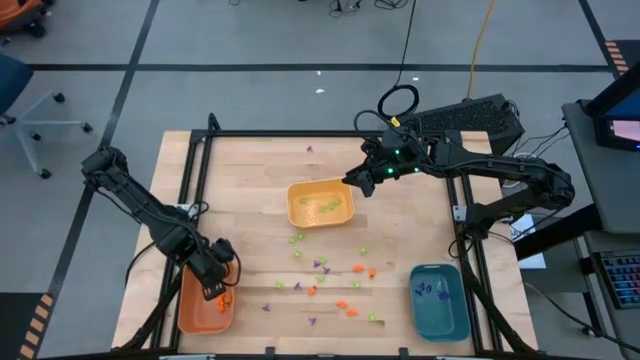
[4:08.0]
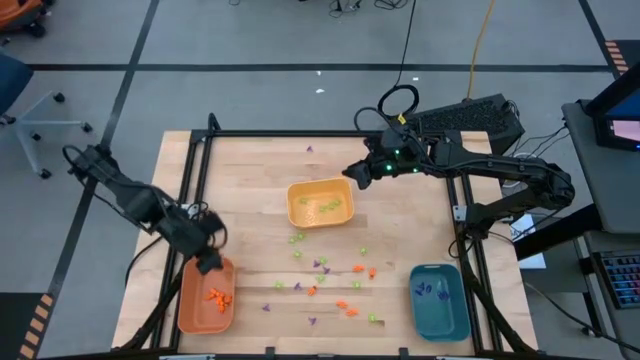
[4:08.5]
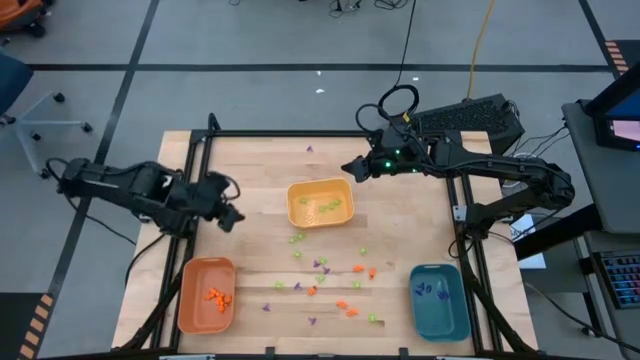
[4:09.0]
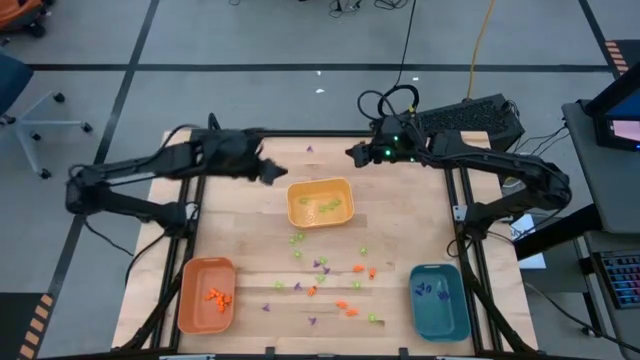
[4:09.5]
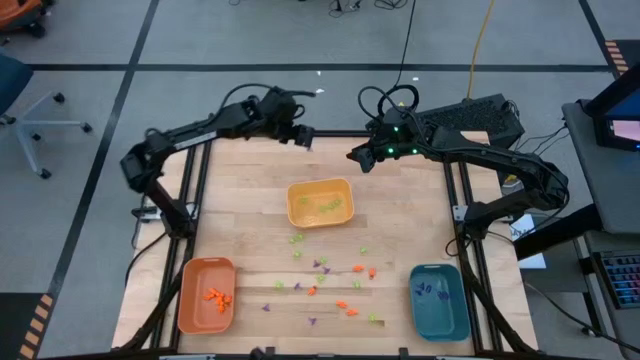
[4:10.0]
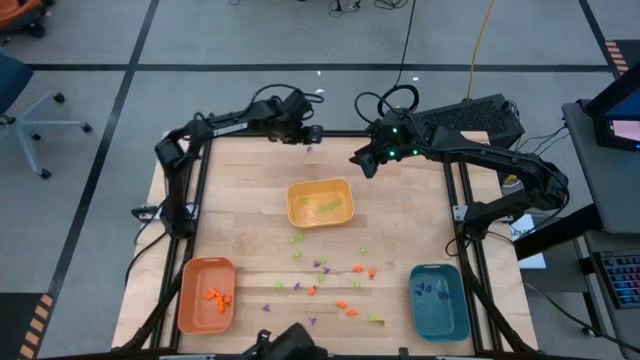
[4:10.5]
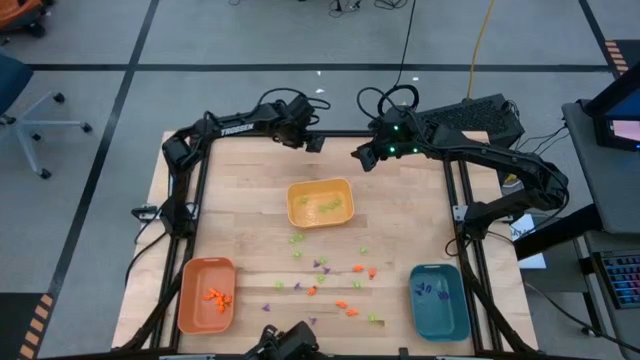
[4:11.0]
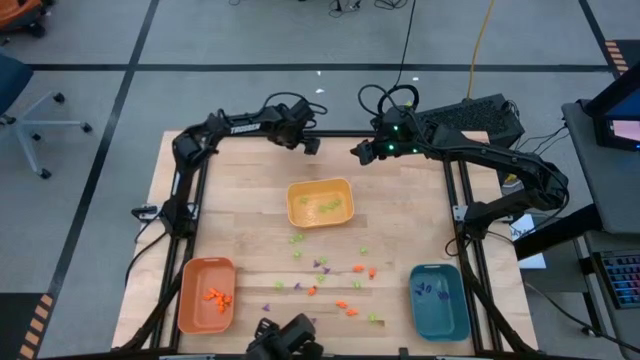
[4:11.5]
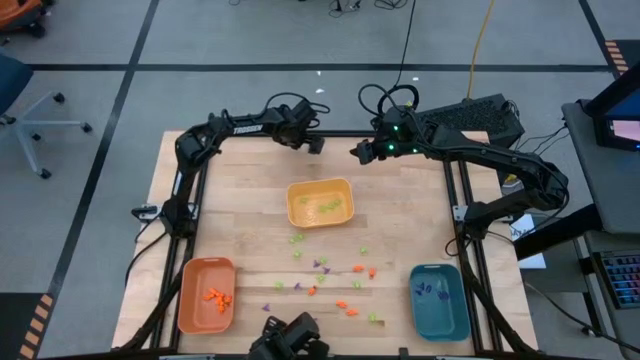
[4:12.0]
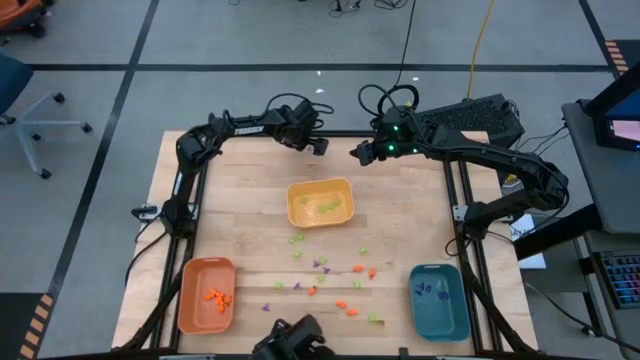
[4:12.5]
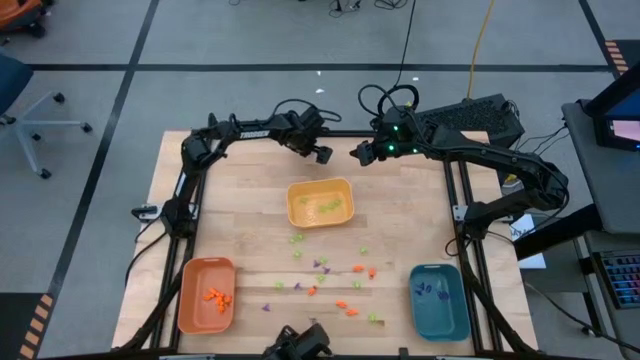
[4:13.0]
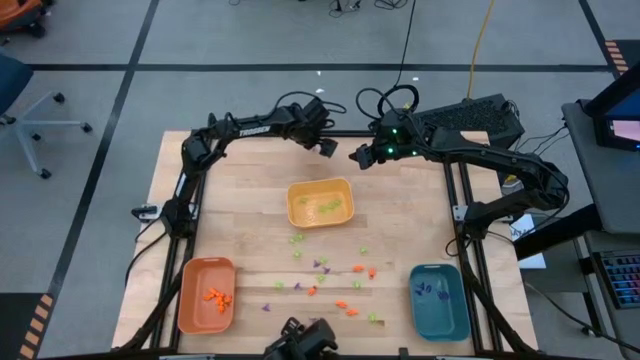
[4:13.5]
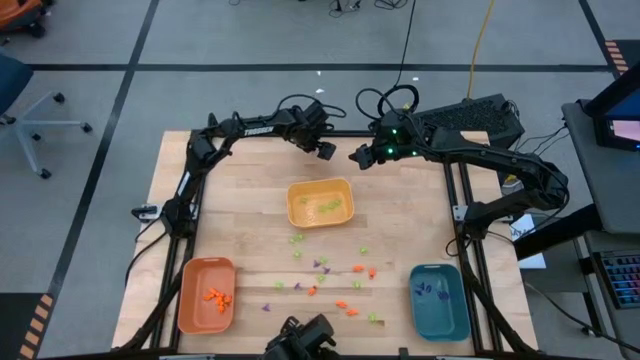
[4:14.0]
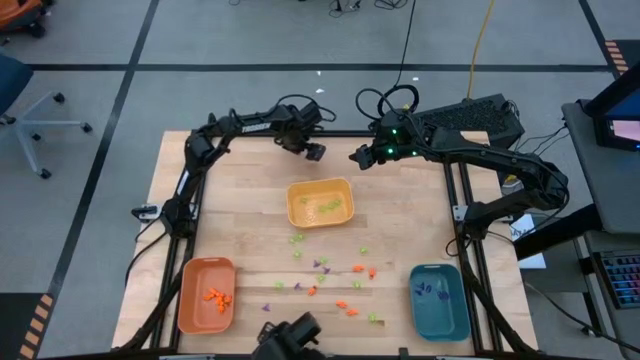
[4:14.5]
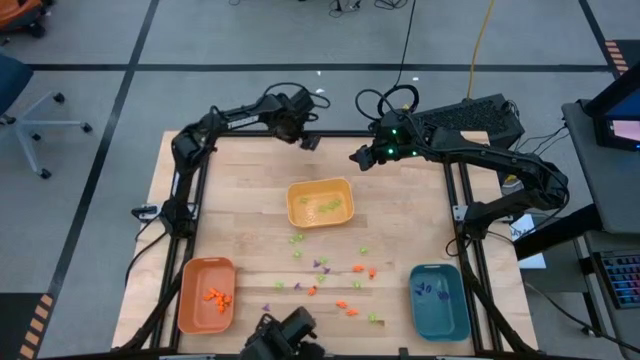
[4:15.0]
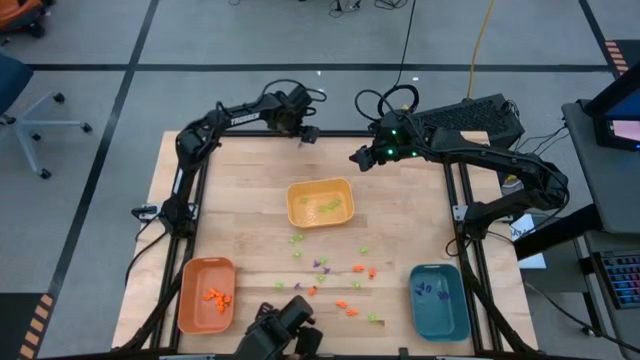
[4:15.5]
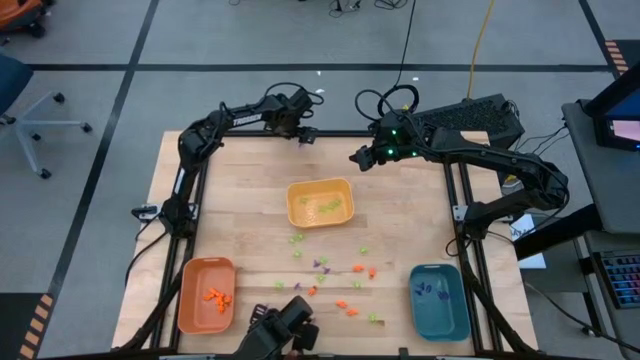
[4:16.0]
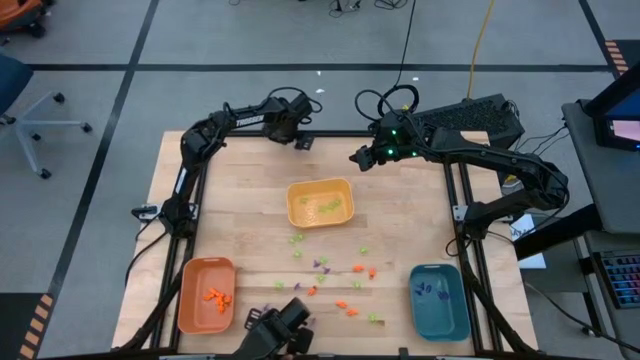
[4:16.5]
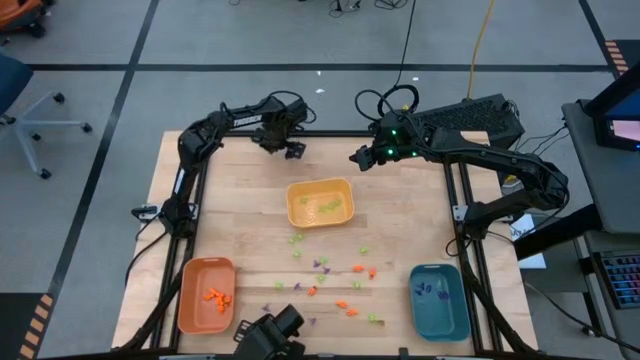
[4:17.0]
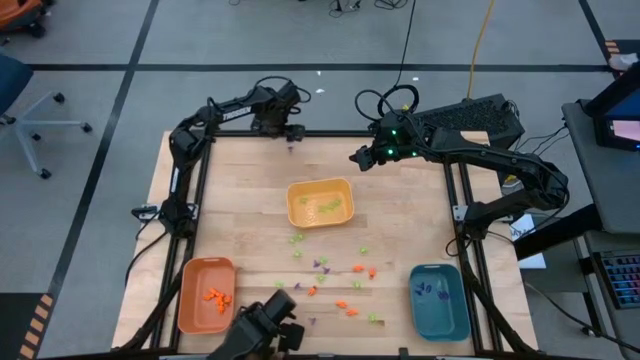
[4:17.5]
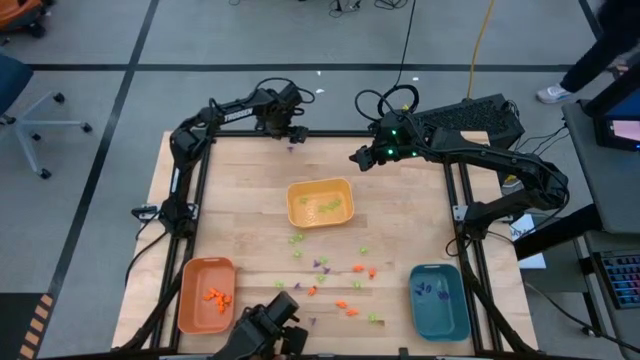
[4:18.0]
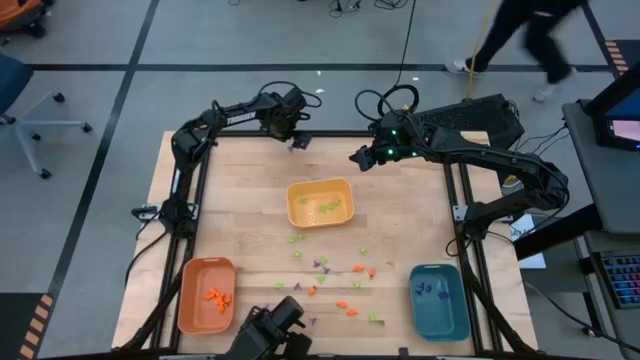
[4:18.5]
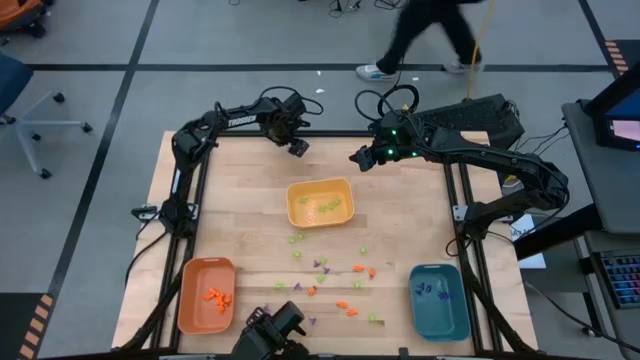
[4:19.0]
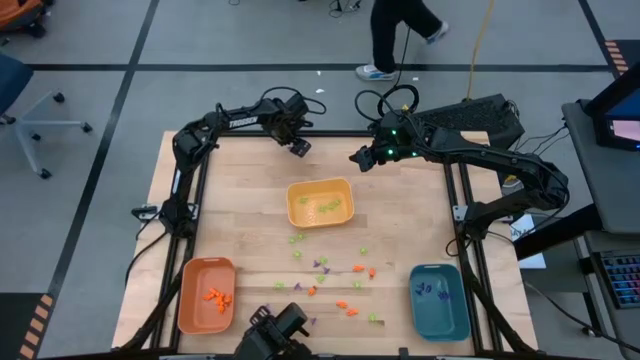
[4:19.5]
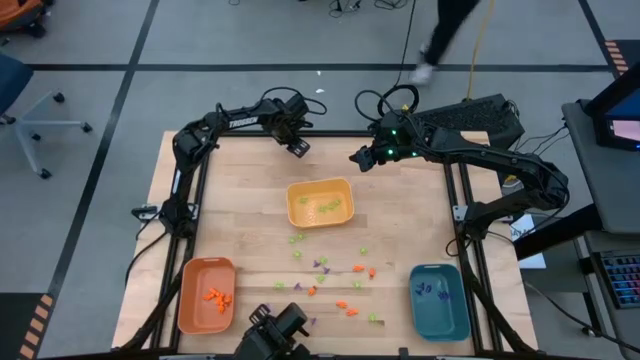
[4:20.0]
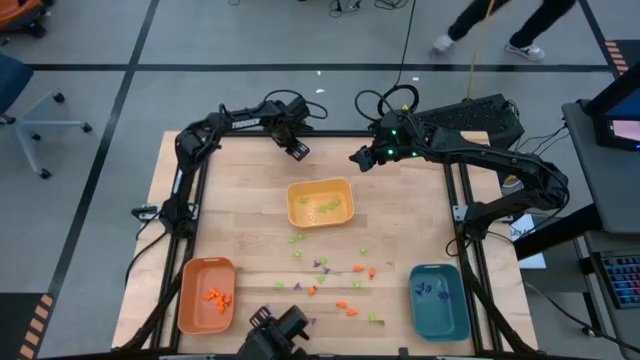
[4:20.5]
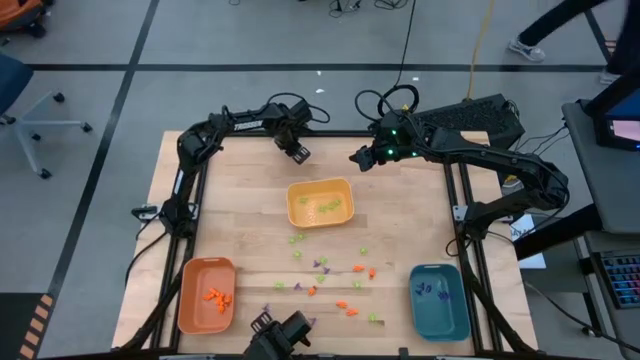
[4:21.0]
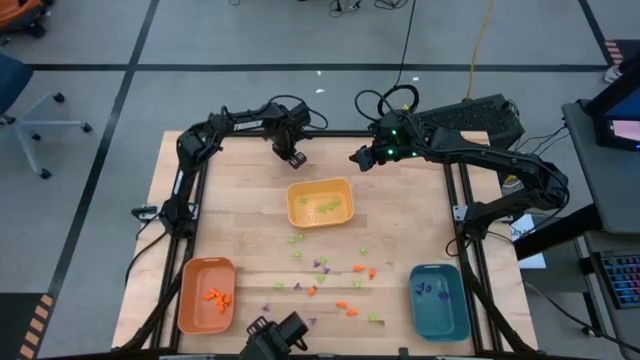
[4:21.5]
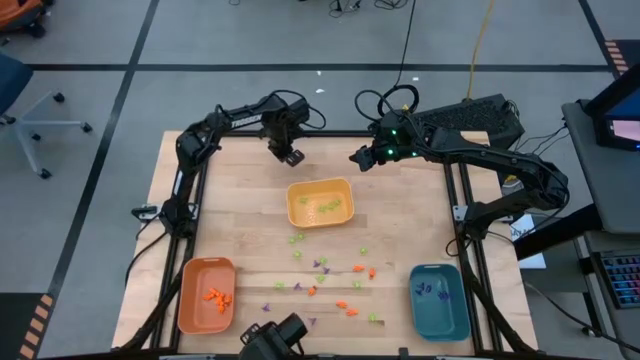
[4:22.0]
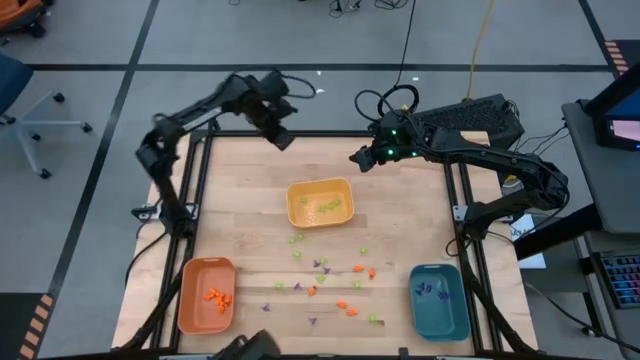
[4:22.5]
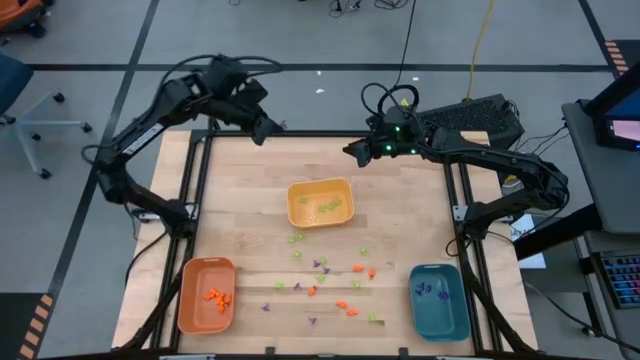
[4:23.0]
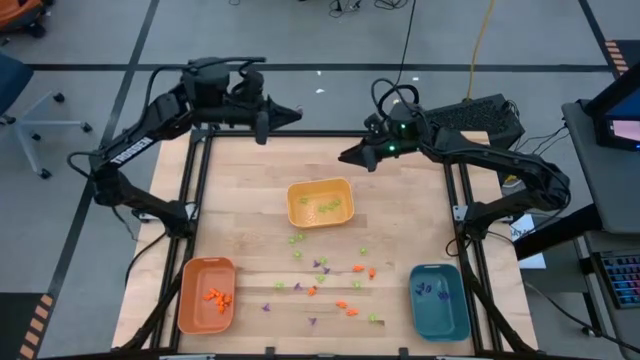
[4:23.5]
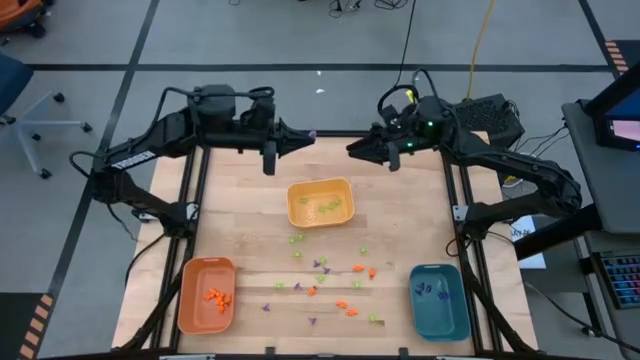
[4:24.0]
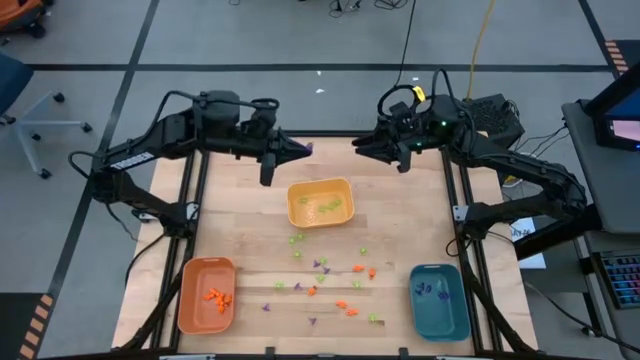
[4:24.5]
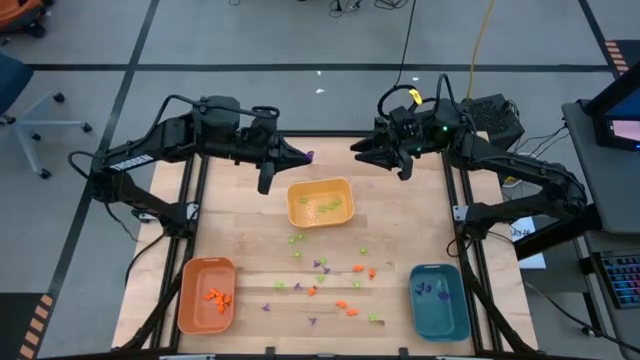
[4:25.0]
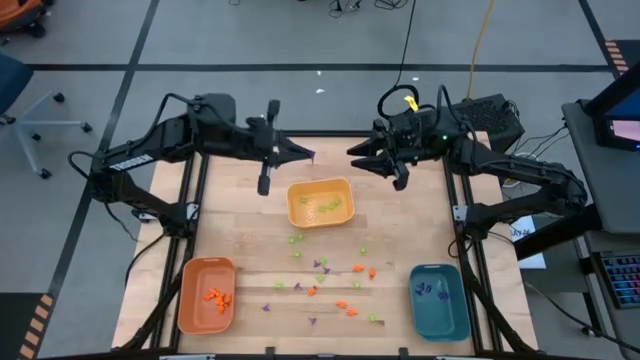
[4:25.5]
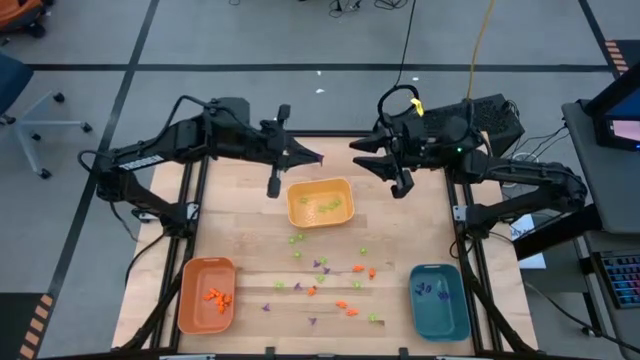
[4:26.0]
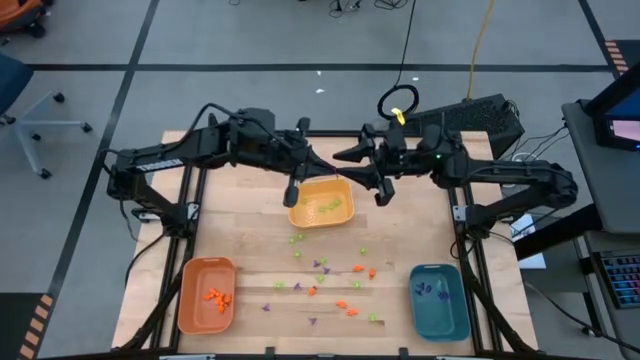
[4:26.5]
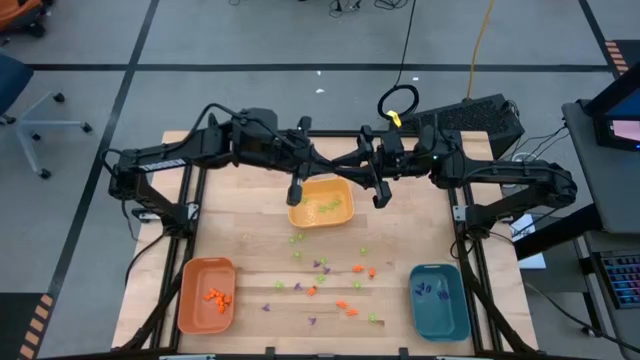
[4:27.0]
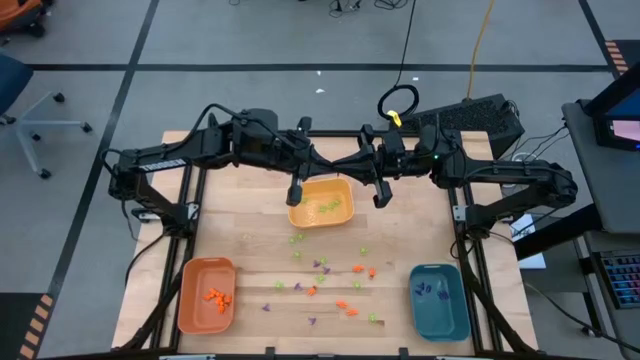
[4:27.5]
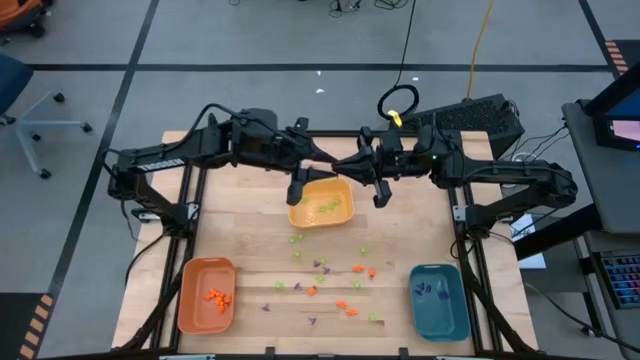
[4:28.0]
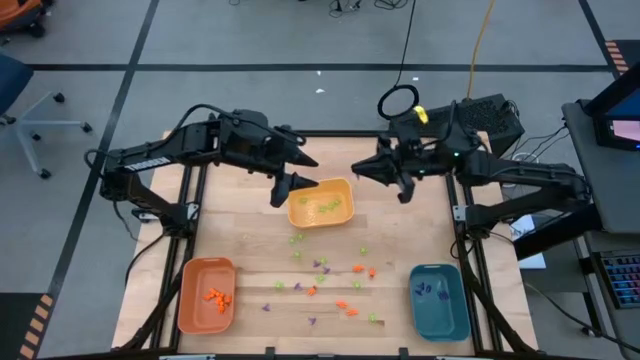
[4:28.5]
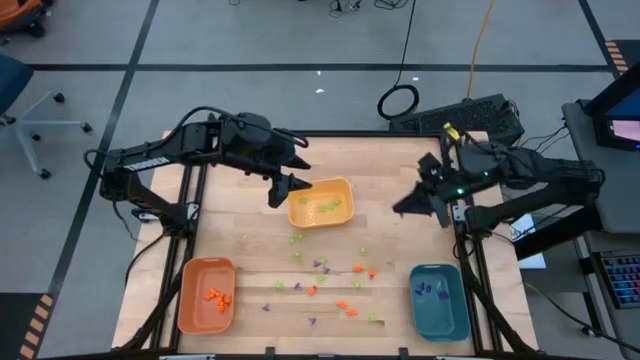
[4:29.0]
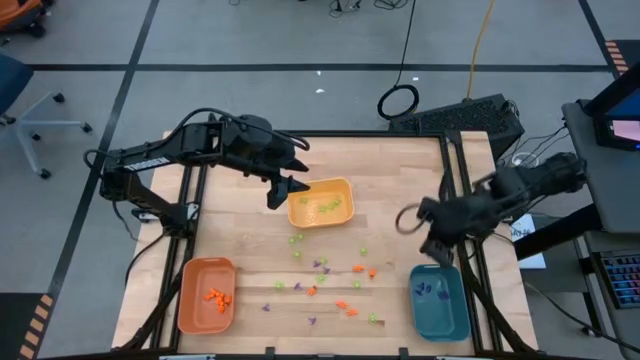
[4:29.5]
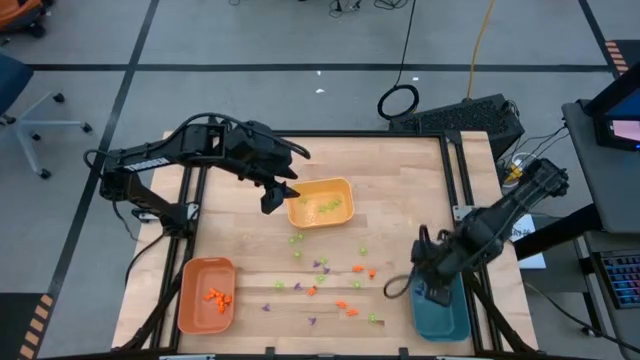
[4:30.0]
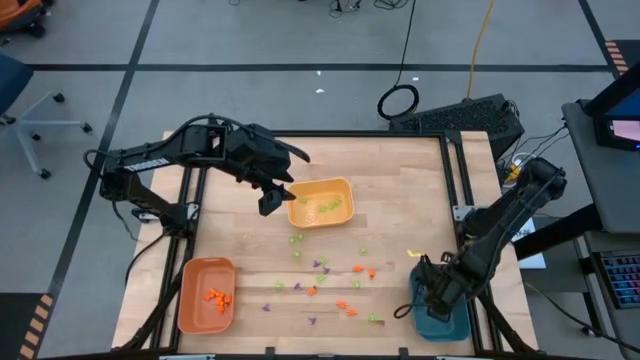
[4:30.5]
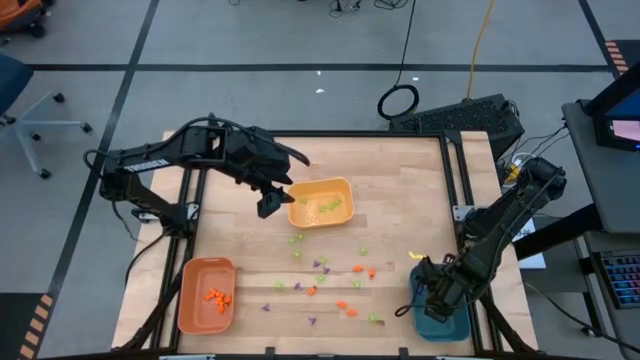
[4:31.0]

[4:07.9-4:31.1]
Task: Sort Halloween decoration
Put the violet witch hat toy into the blue bin
